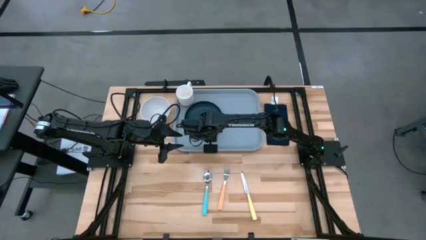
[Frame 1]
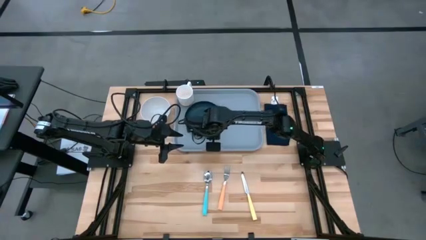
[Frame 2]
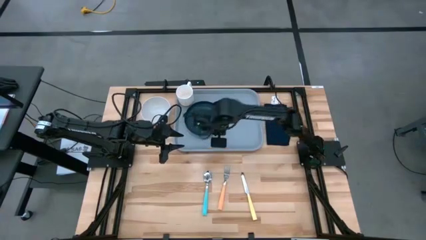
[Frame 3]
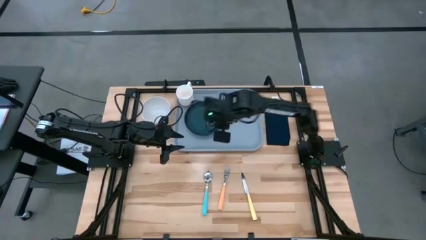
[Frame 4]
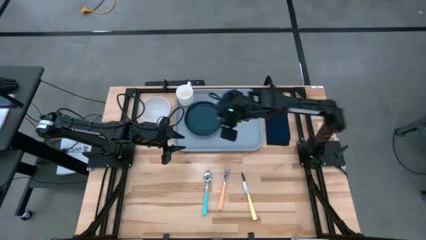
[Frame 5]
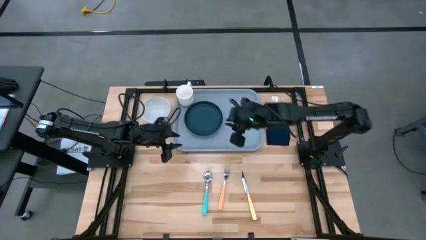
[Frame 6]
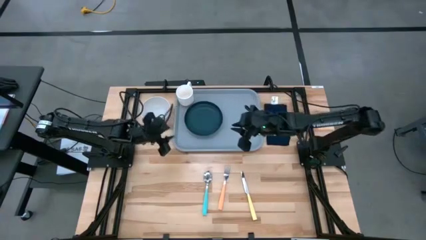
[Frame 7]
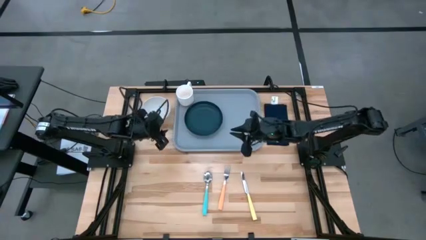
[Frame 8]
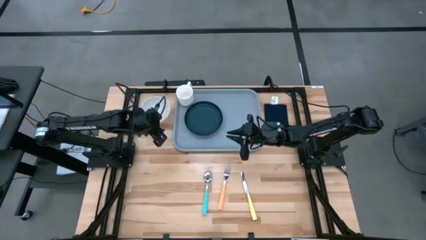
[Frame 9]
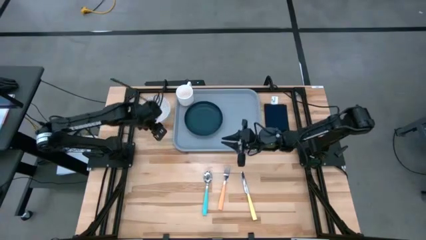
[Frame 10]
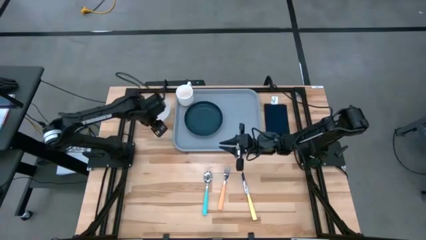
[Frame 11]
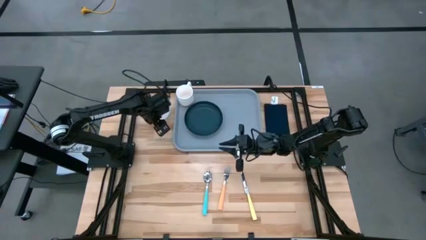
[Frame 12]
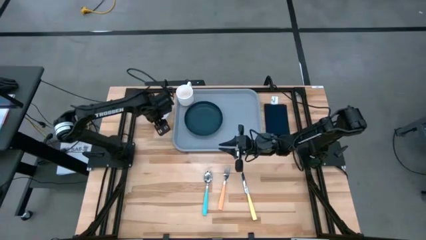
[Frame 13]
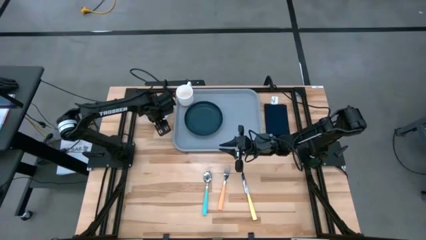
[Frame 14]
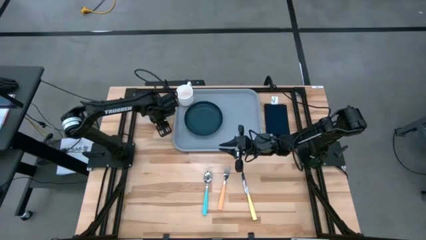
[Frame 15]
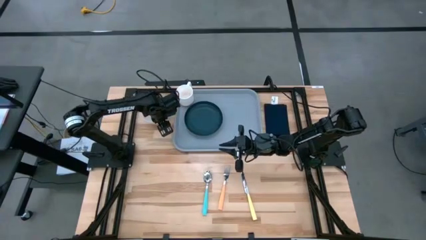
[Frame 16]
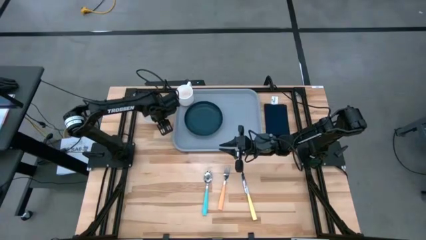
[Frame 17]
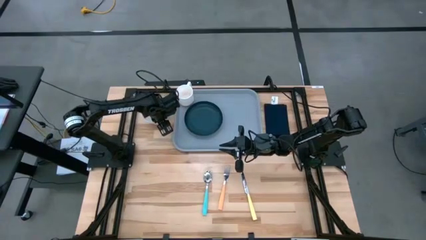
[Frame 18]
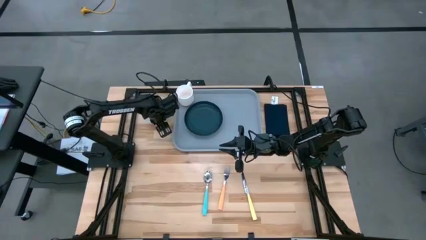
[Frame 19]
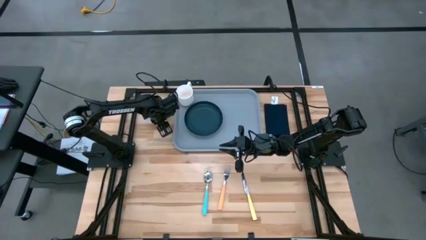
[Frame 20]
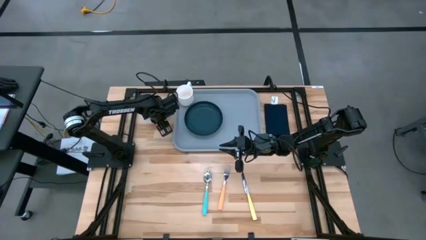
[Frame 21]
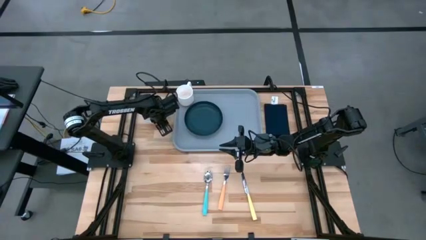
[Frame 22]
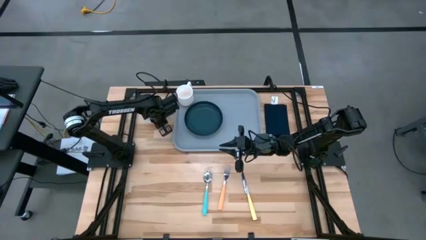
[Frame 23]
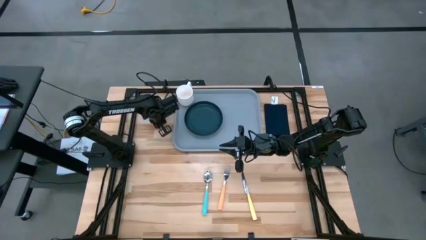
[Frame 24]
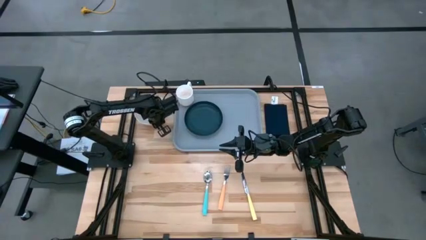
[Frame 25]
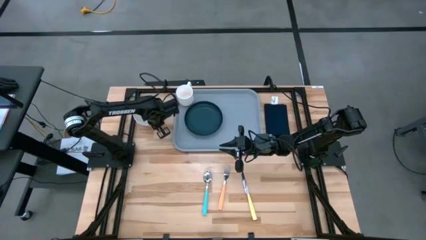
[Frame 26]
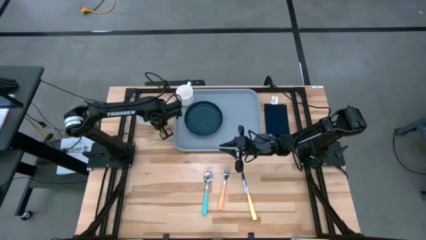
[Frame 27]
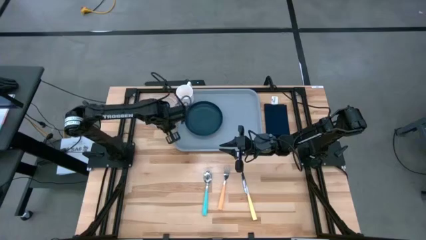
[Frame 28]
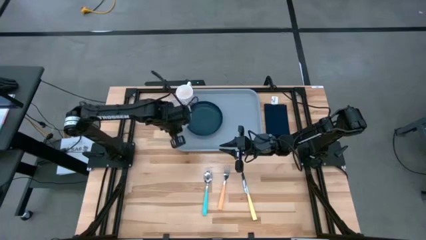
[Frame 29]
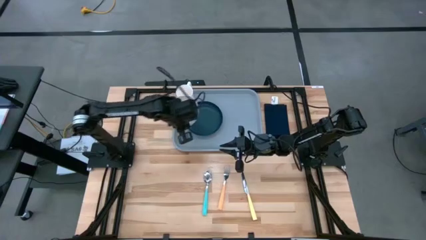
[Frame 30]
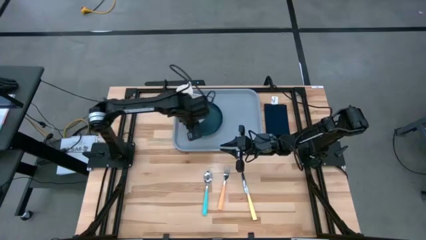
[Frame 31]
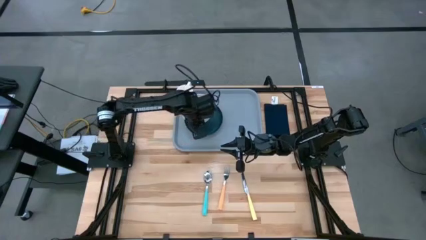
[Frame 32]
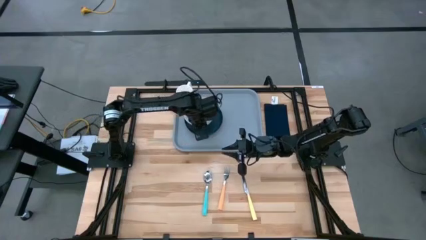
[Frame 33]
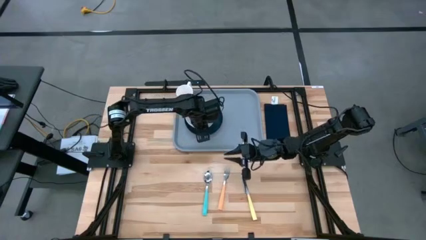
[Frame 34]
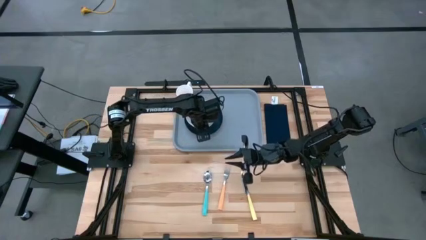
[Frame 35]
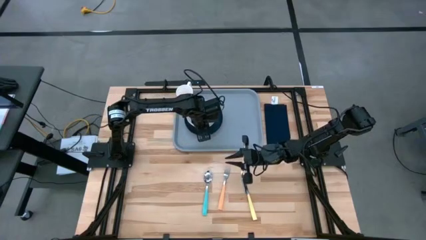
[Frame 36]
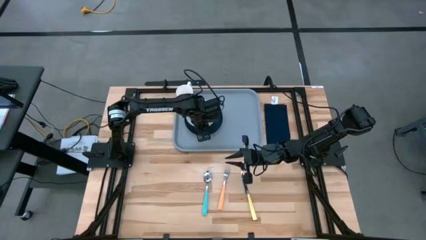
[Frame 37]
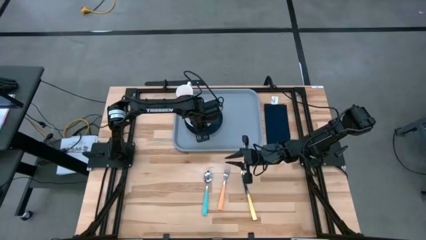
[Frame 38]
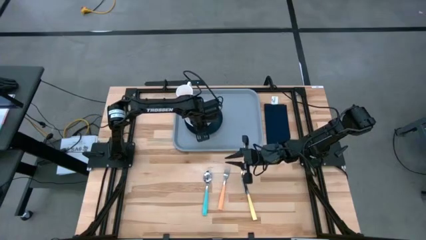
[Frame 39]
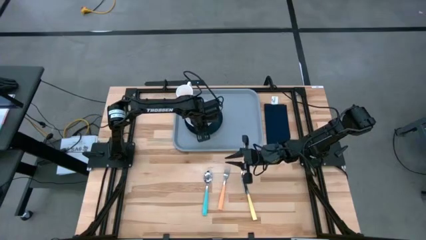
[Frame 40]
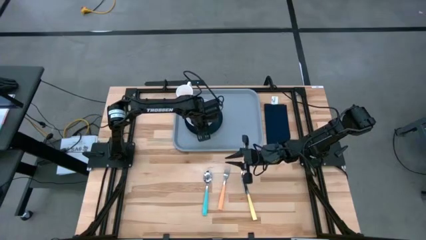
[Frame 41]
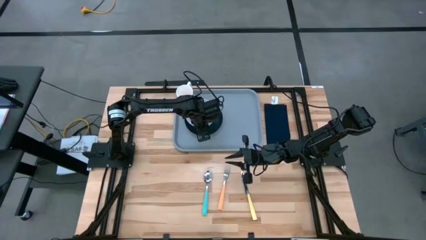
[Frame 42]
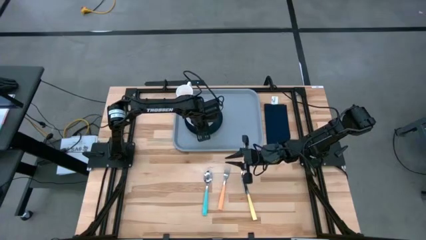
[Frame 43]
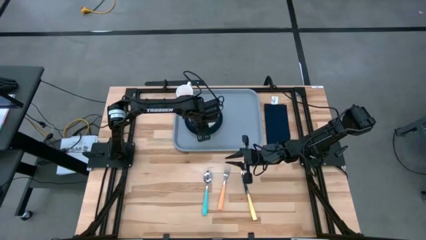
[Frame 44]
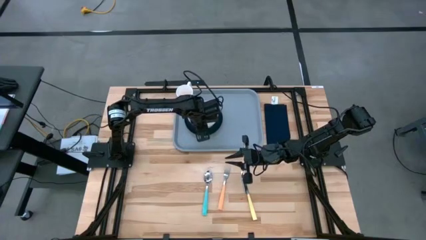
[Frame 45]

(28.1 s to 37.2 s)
Task: Set up tray
Put the white bowl on the green plate to the bottom right of the white mug

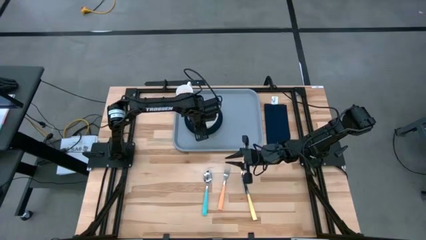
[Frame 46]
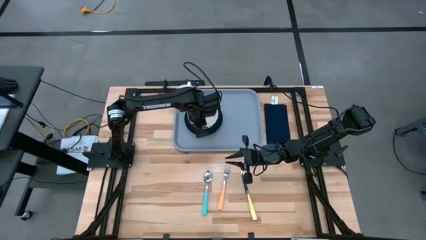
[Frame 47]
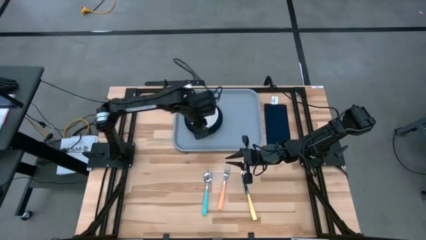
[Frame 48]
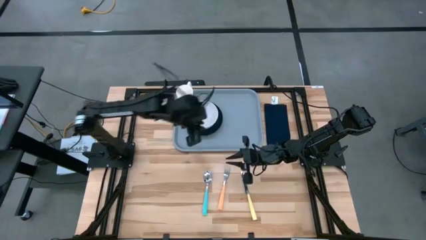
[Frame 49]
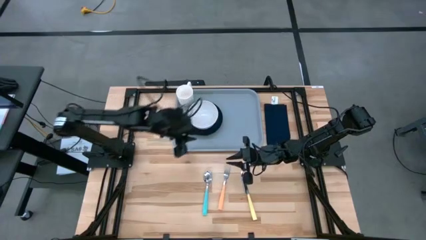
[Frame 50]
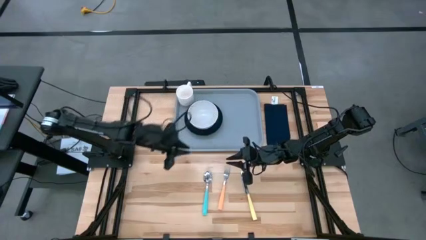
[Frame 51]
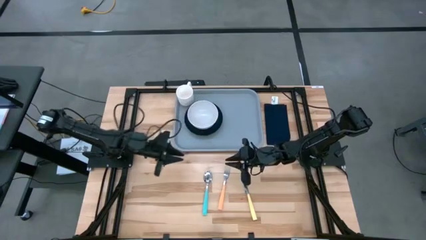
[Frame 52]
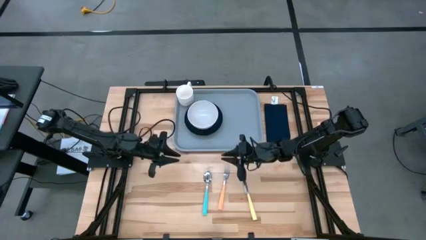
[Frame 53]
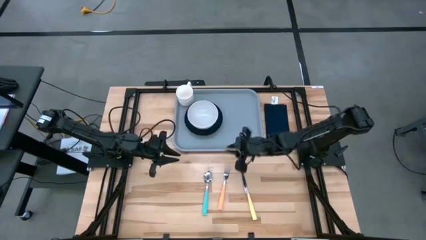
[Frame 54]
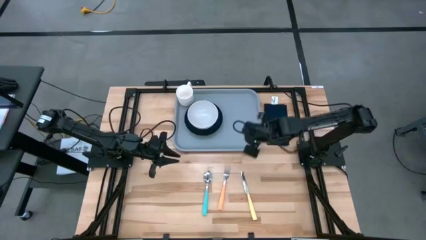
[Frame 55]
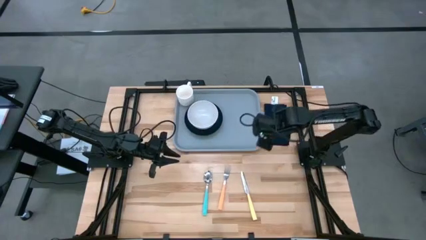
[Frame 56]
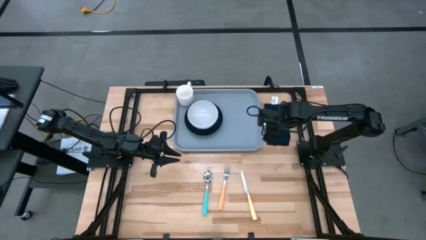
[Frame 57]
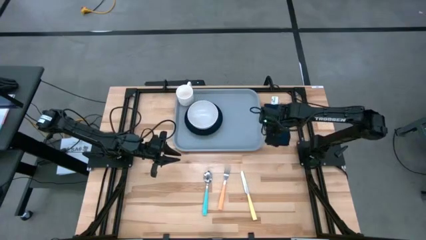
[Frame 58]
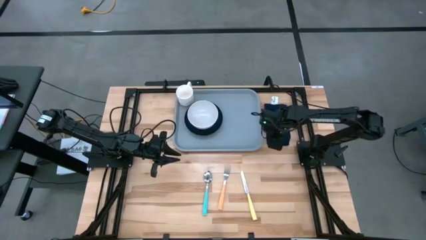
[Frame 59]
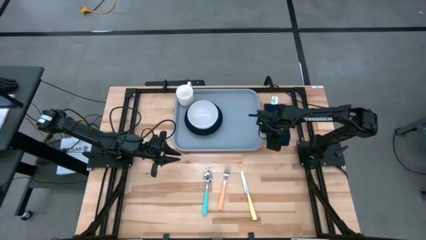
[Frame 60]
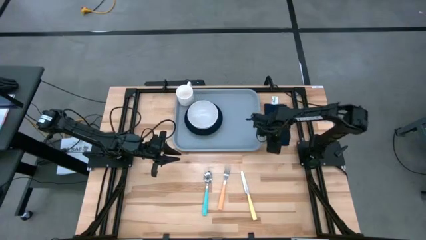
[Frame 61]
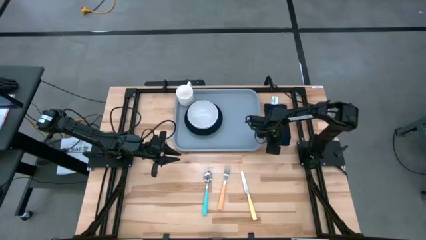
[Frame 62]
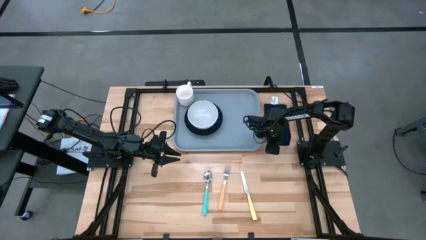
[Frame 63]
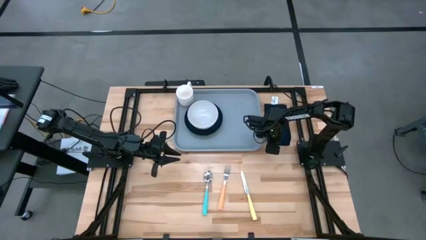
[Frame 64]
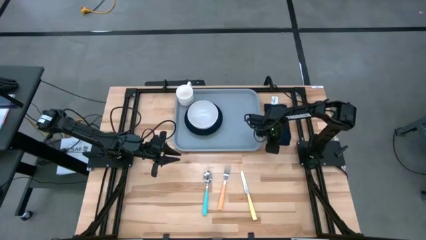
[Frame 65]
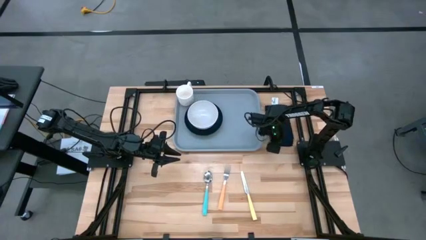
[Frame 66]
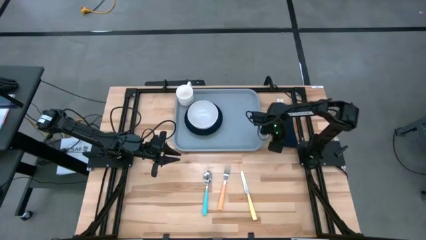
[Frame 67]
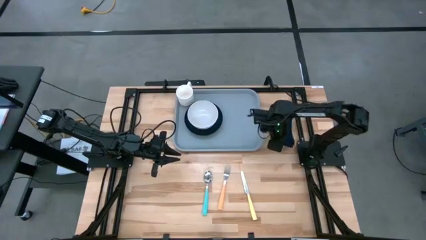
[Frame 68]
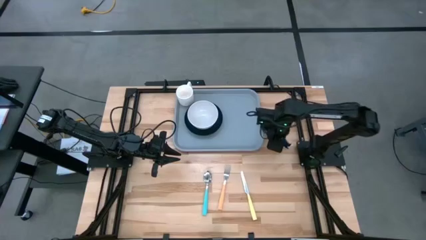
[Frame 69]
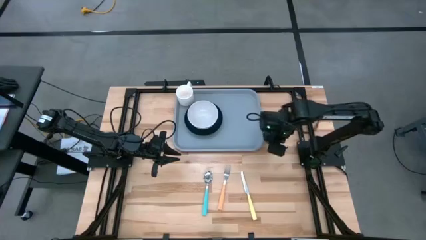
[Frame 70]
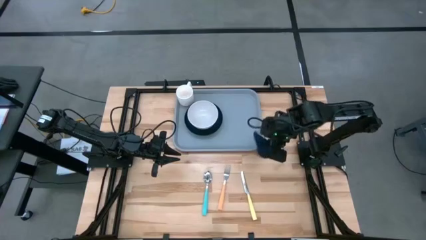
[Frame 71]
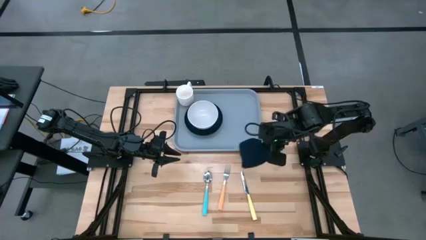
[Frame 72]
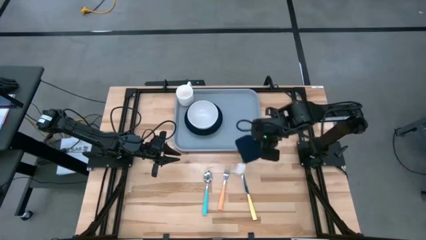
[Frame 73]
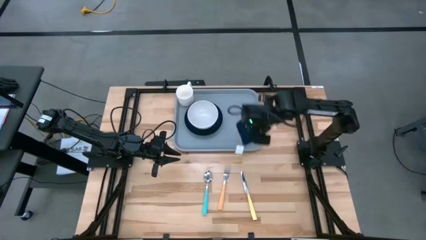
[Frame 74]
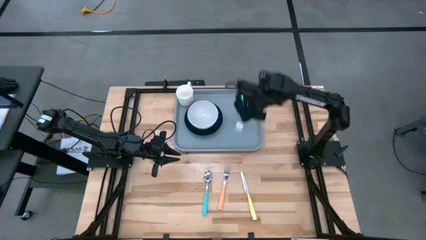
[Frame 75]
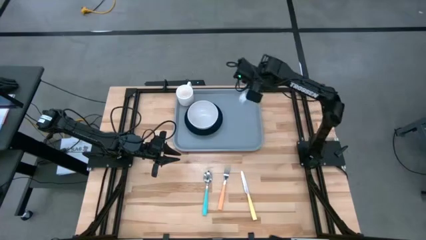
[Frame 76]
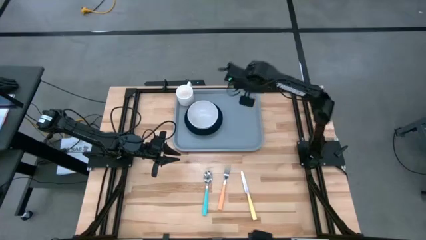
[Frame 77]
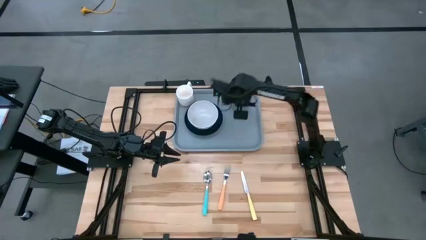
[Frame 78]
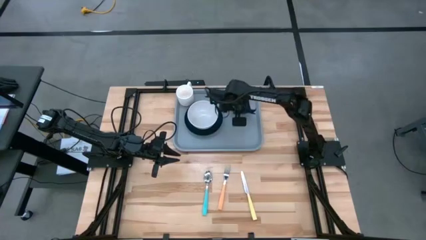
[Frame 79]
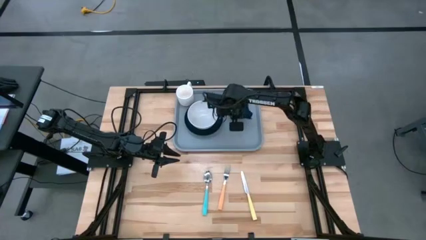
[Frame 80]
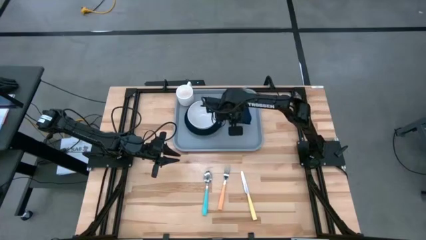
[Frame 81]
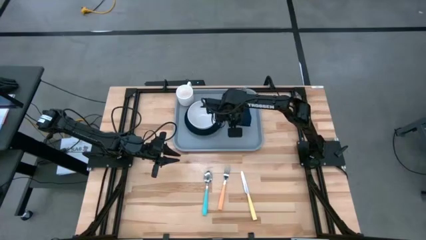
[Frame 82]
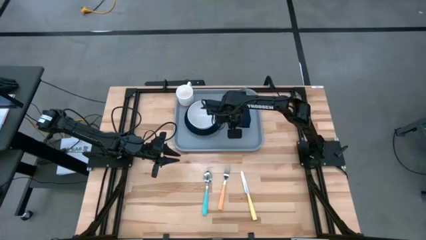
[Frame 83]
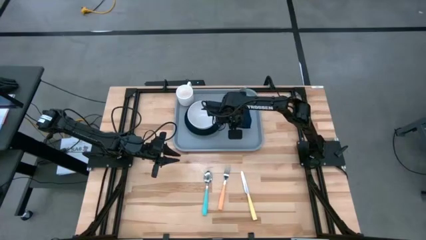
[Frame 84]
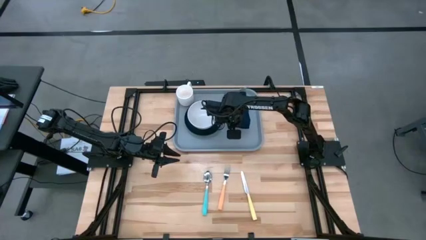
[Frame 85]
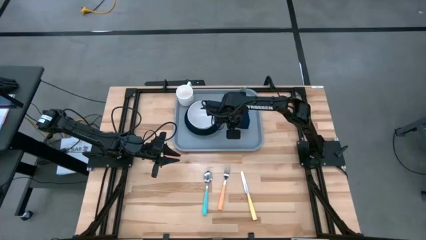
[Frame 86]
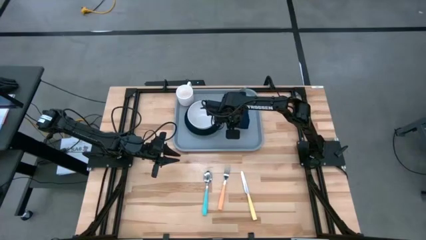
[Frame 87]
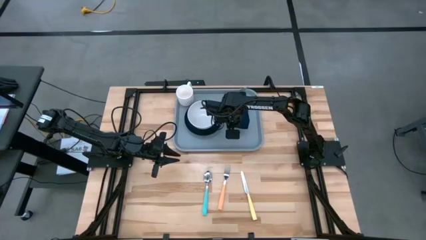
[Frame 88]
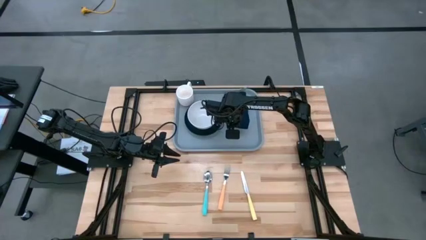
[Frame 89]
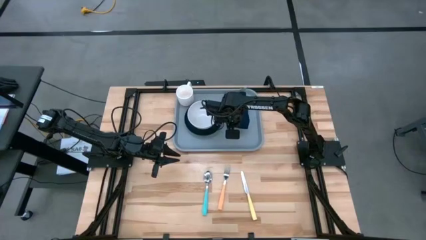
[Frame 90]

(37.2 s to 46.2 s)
Put the blue napkin on the gray serving tray to the right of the green plate
